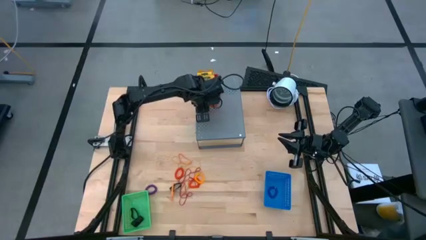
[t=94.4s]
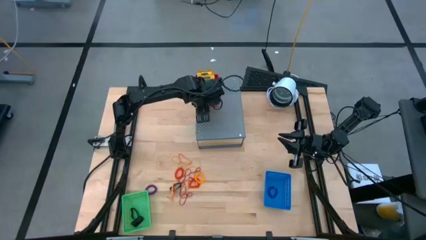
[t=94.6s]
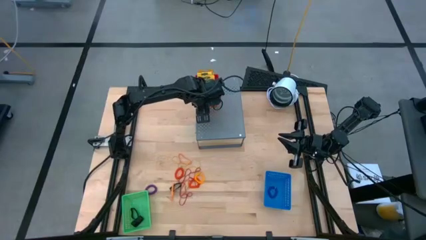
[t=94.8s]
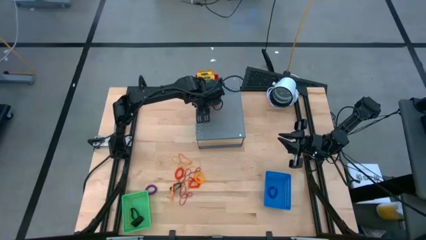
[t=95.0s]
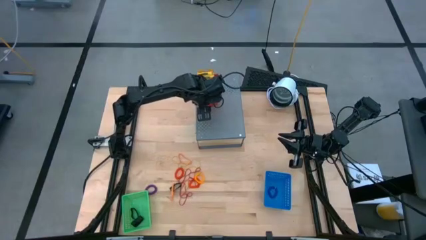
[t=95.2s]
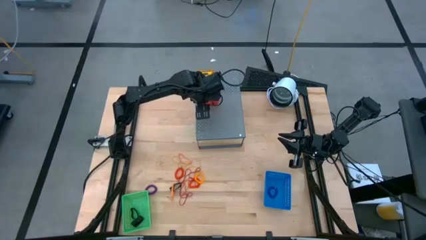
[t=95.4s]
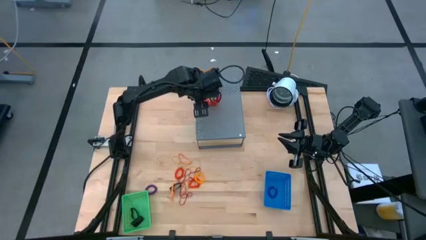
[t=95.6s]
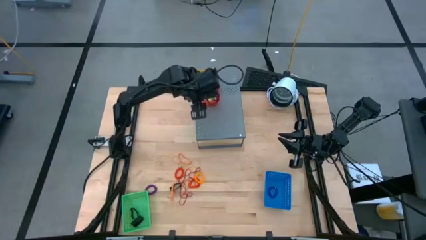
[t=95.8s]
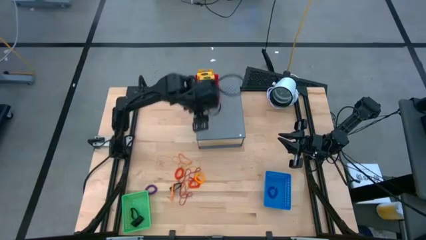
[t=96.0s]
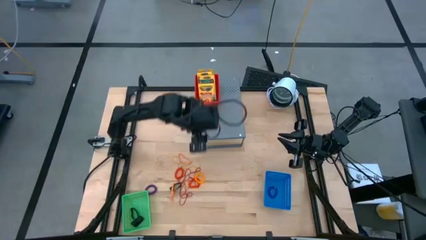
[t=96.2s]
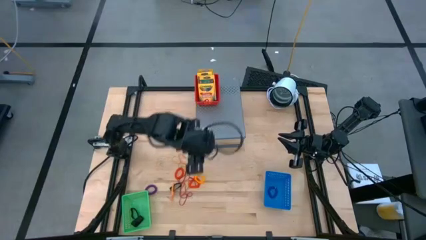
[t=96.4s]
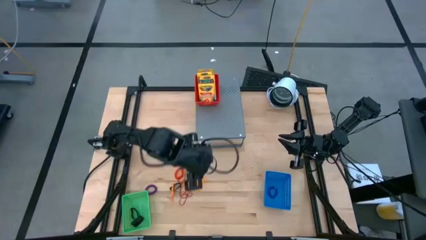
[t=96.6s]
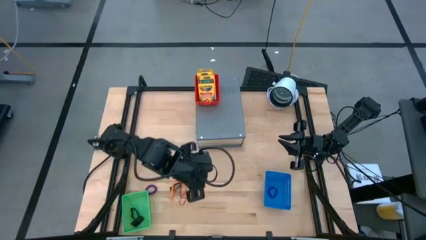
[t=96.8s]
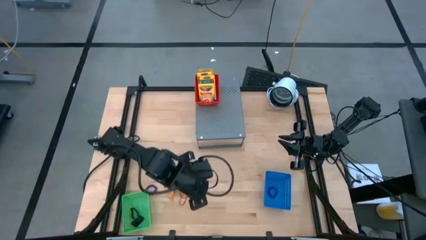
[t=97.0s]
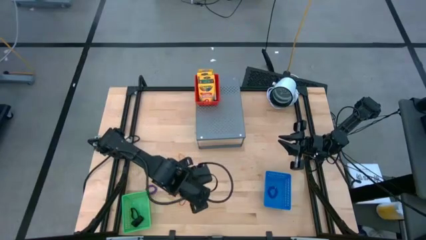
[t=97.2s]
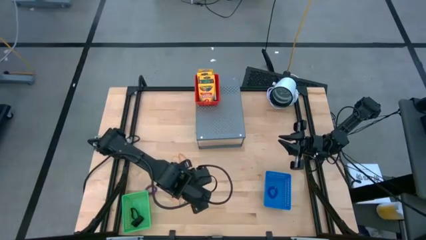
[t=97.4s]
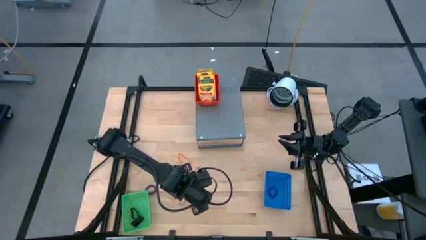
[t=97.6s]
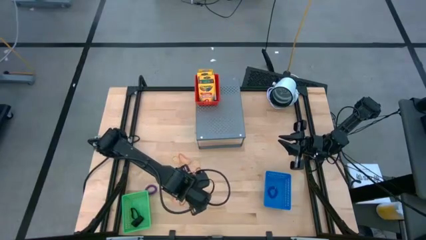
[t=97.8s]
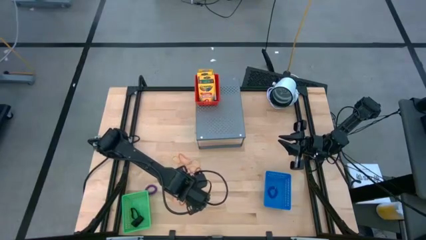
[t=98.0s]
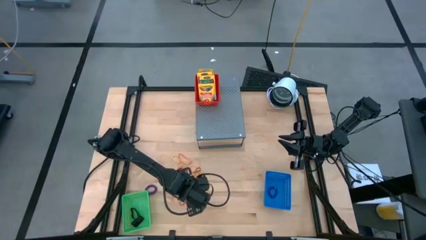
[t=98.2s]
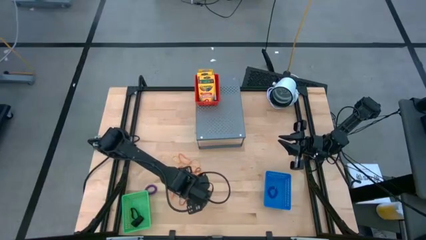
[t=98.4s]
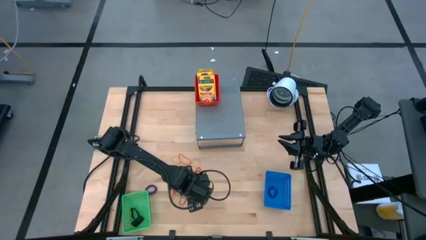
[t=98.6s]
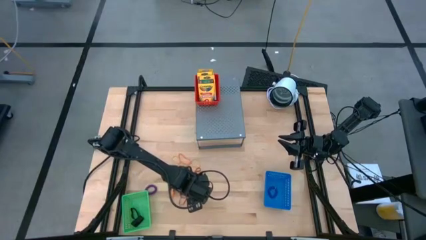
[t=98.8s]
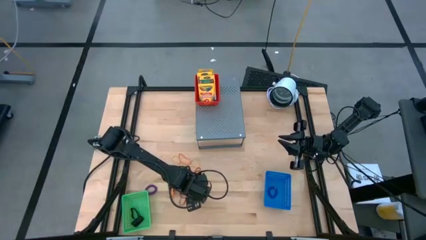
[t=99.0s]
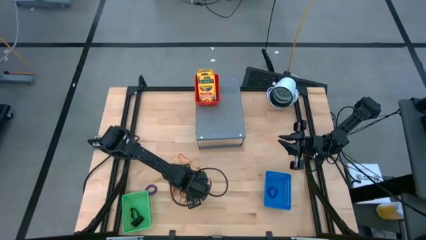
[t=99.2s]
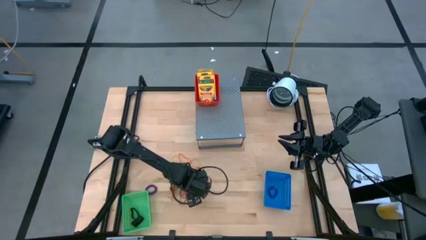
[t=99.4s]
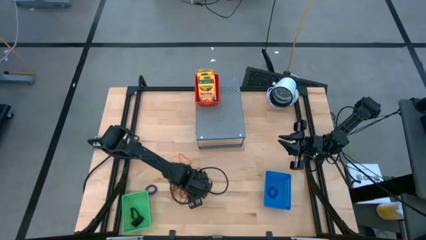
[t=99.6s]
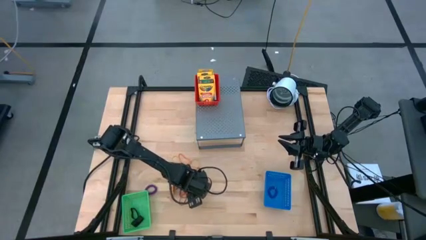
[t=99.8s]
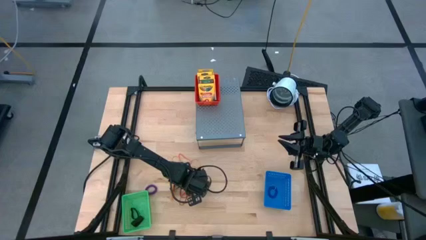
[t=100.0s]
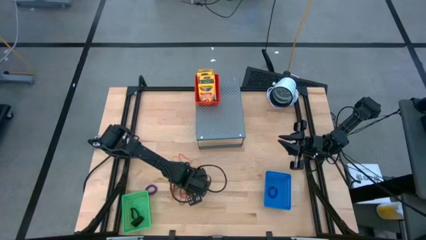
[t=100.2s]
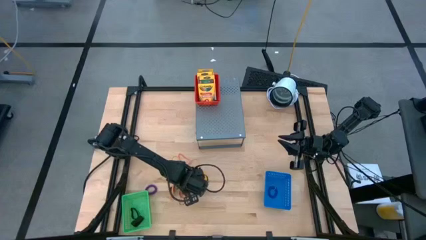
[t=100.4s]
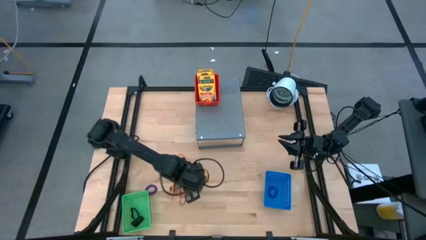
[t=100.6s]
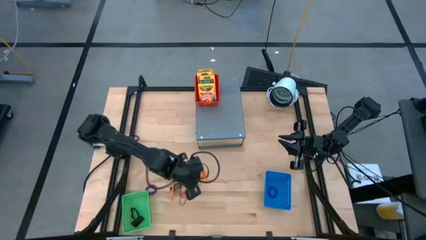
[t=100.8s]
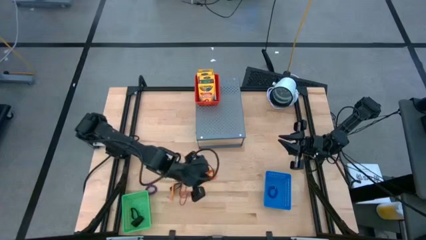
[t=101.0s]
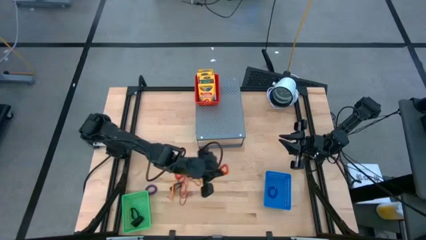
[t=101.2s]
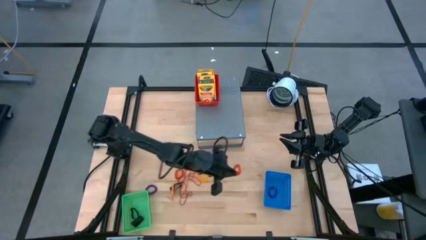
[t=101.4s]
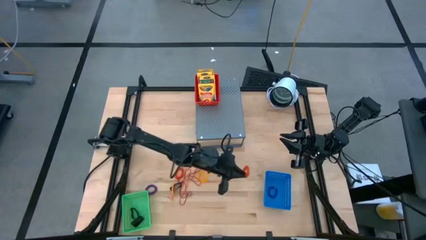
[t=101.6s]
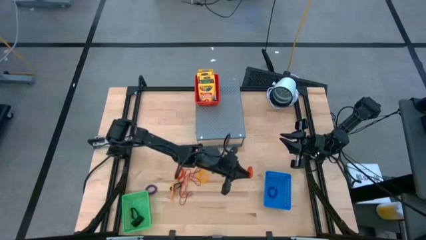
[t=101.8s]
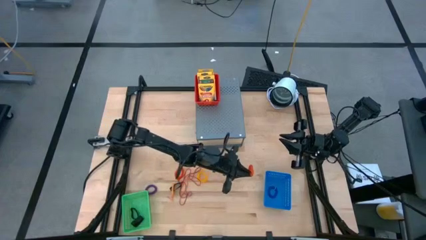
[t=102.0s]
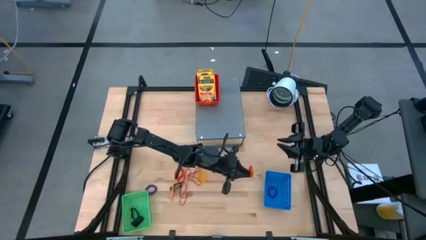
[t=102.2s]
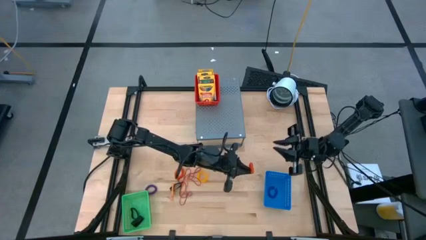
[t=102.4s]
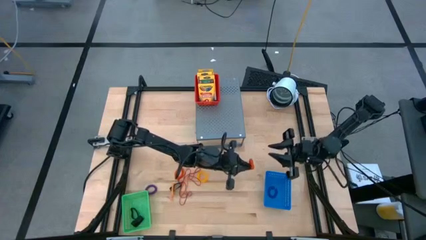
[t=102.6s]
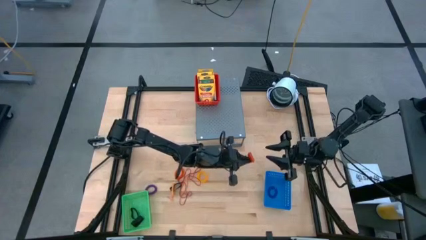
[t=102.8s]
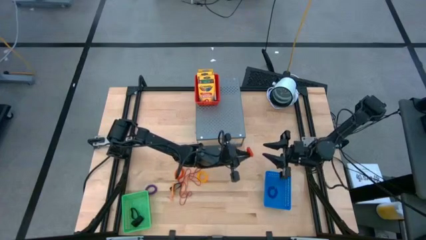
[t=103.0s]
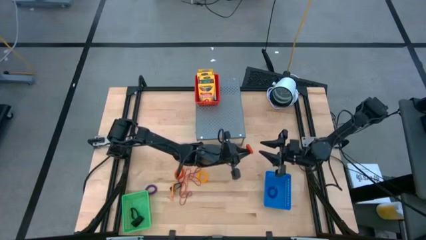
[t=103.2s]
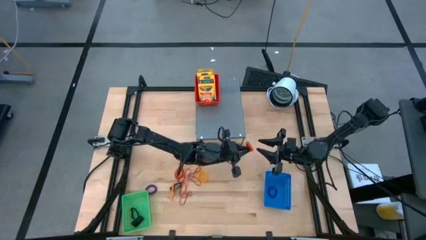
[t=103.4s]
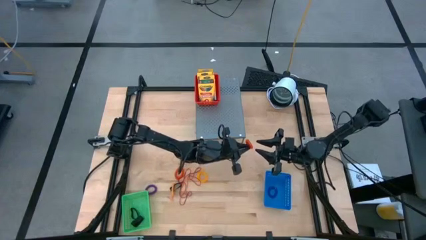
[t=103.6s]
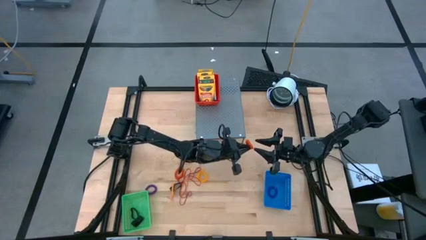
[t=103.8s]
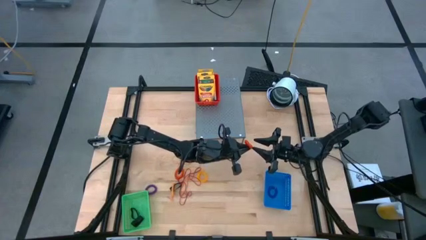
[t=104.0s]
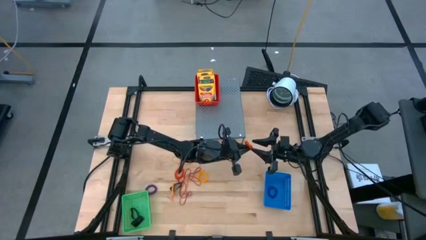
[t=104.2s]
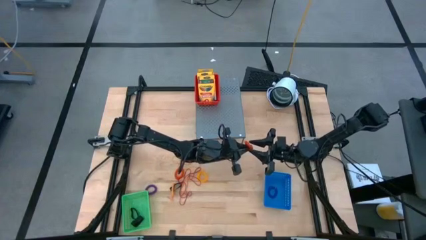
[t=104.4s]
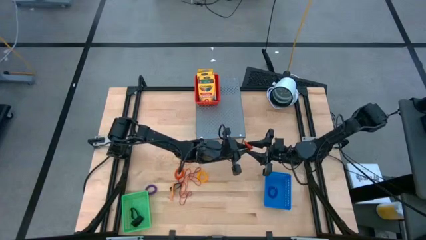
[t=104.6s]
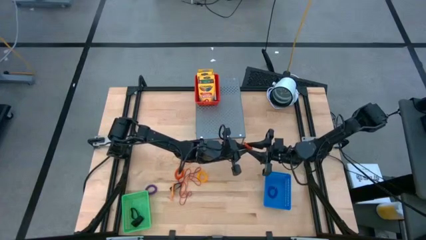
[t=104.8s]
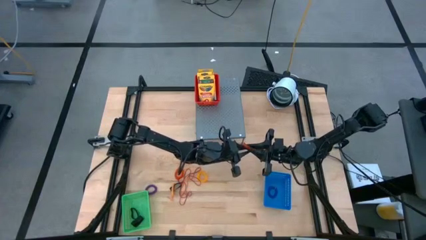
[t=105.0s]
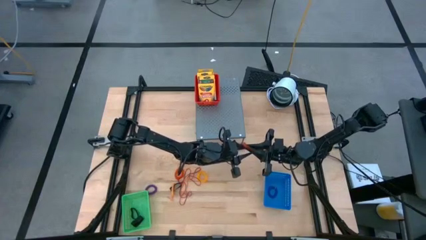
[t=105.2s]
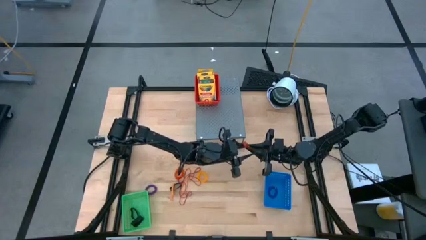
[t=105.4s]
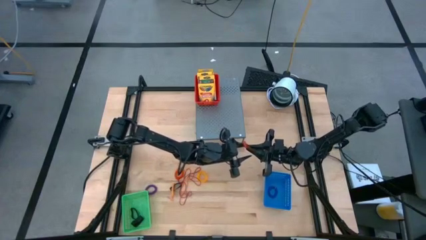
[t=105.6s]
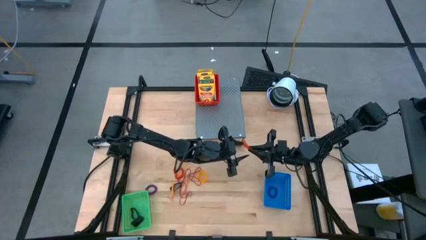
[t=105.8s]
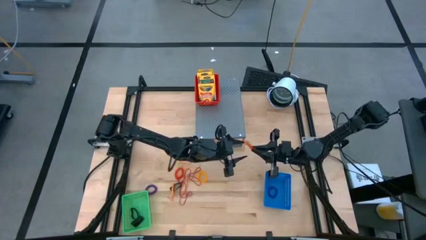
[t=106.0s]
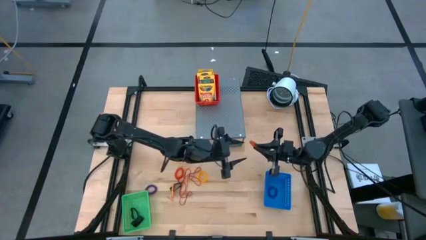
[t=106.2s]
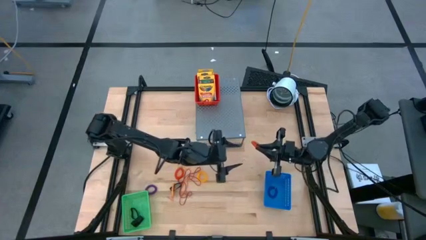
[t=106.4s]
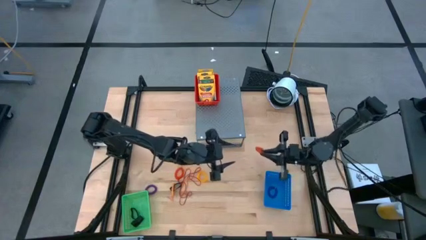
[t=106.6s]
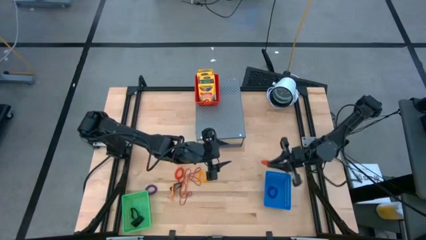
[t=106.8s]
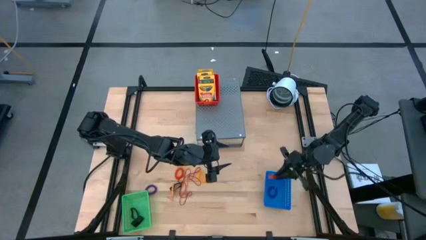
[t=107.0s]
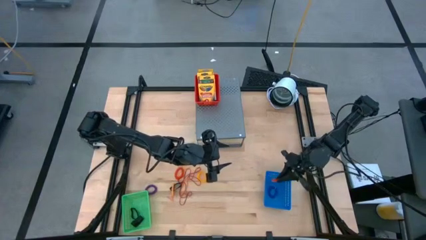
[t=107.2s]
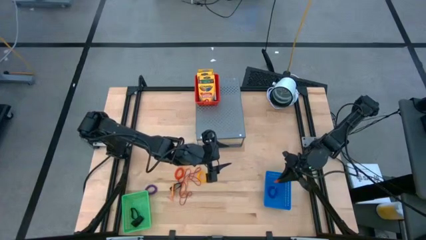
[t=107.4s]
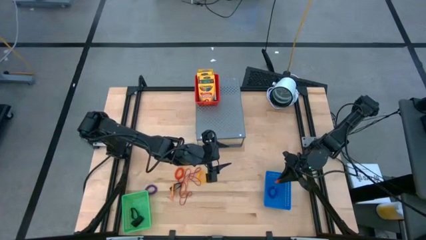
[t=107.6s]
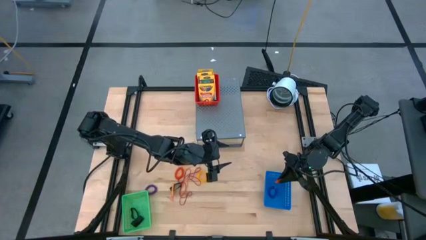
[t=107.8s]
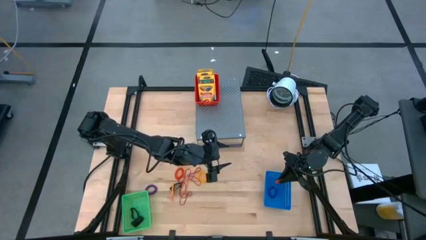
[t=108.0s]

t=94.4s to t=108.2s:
Task: Pick & Place Office Desk Supplies
Put the orange spring keychain into the blue bin

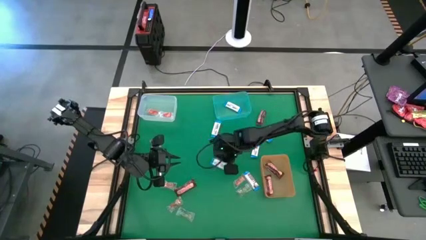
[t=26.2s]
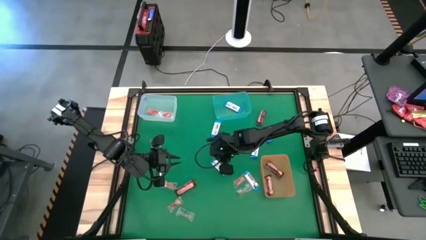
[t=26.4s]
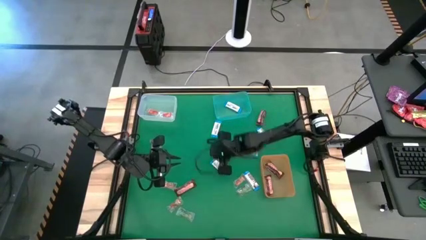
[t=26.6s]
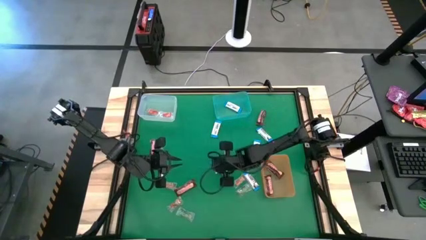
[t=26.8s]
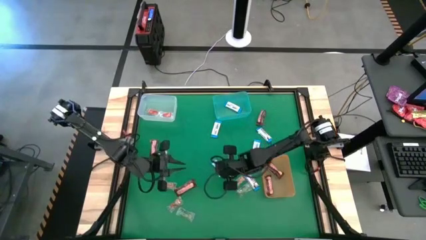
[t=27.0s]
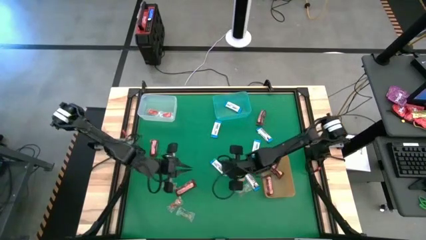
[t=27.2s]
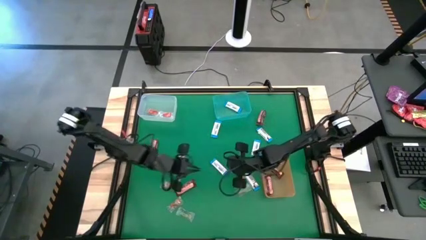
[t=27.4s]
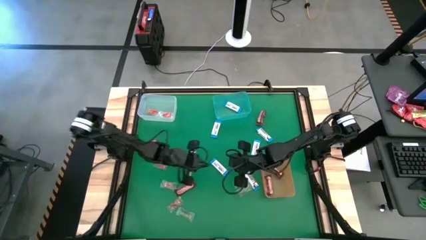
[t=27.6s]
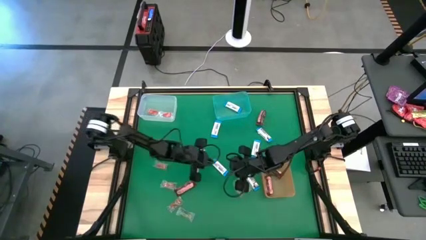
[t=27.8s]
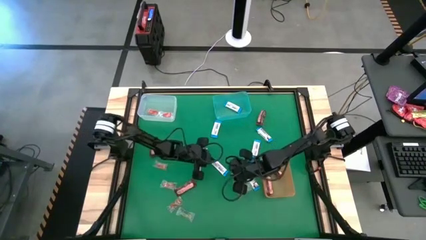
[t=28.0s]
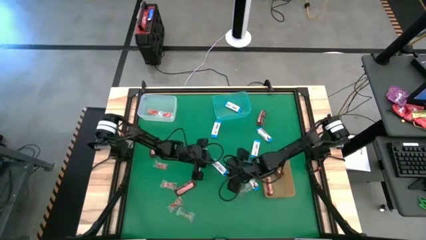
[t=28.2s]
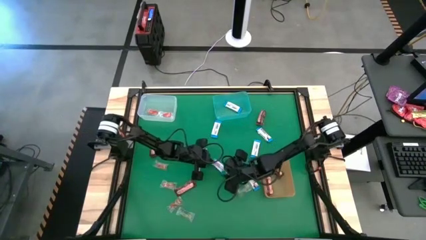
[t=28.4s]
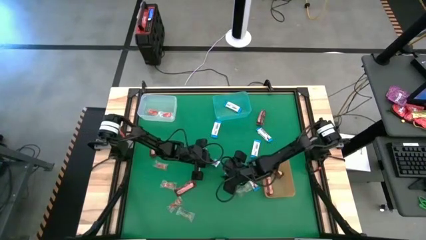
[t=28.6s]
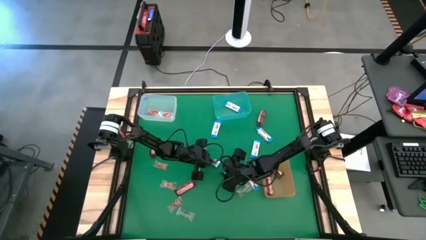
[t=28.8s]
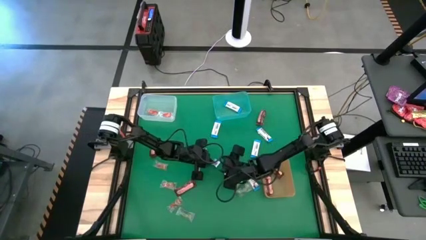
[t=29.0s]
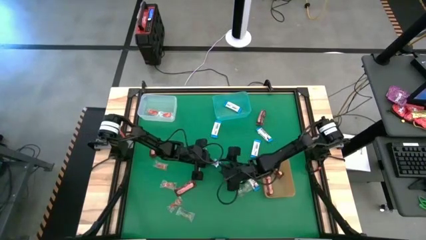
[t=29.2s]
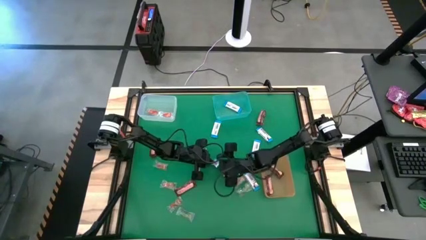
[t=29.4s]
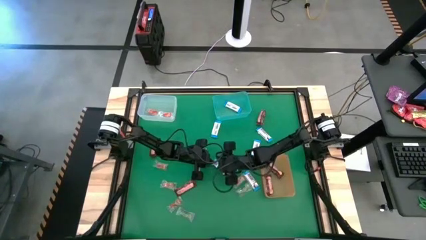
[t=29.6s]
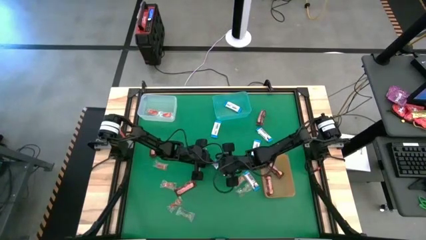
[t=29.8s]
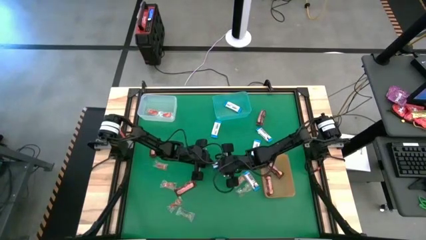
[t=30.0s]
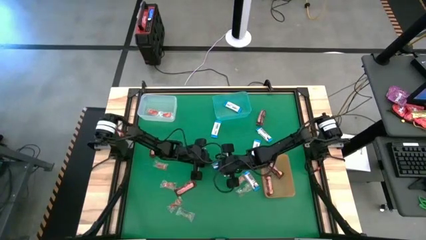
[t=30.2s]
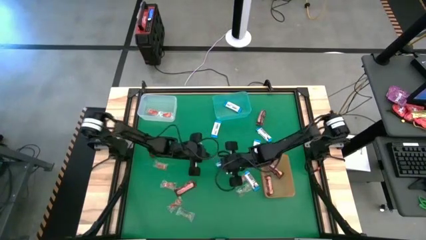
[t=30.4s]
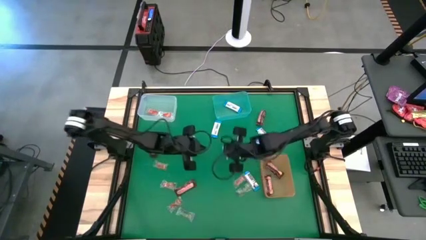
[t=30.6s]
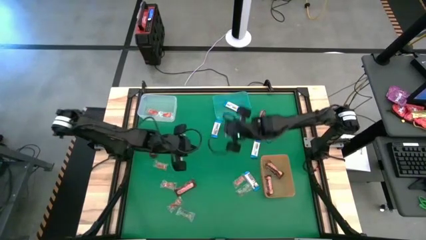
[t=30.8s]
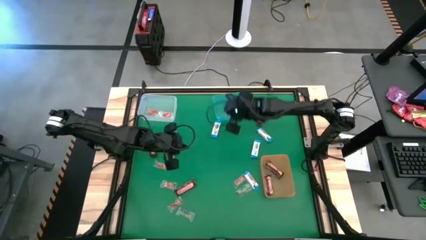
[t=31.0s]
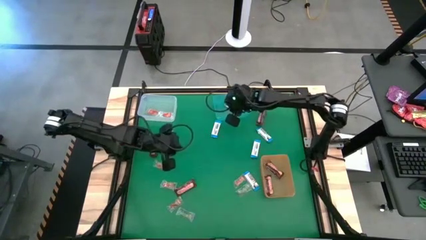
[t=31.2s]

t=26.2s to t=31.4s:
Task: Sort candy by brand, put in halloween buckets
Put the white chocolate into the light blue bin
